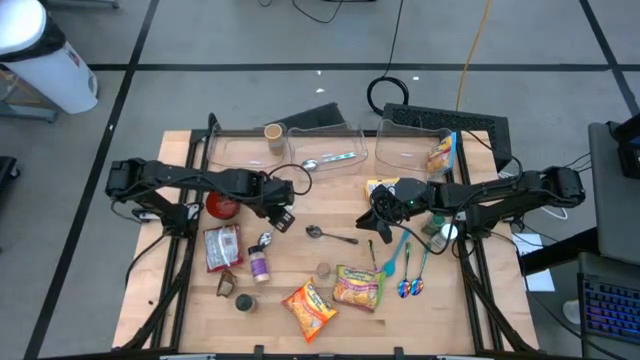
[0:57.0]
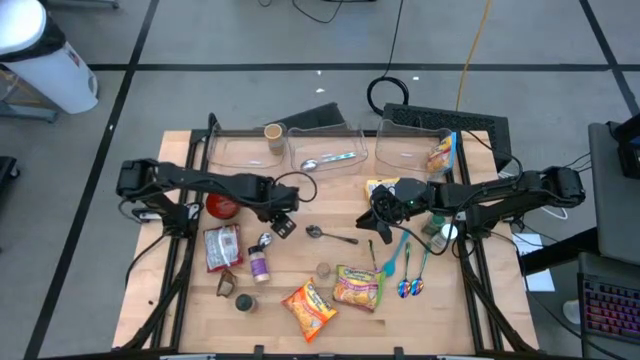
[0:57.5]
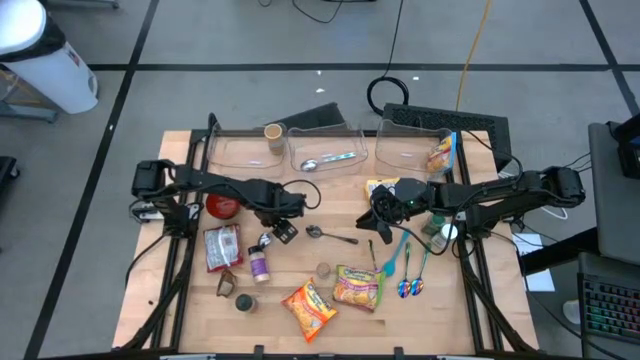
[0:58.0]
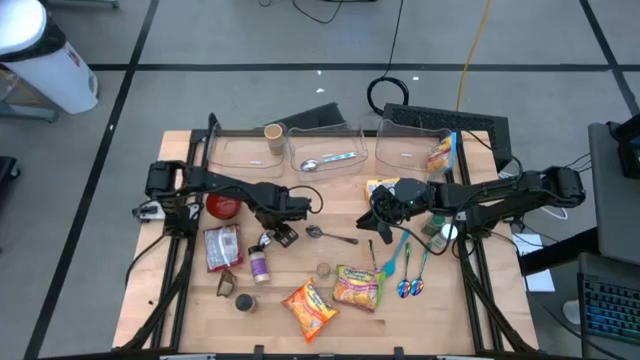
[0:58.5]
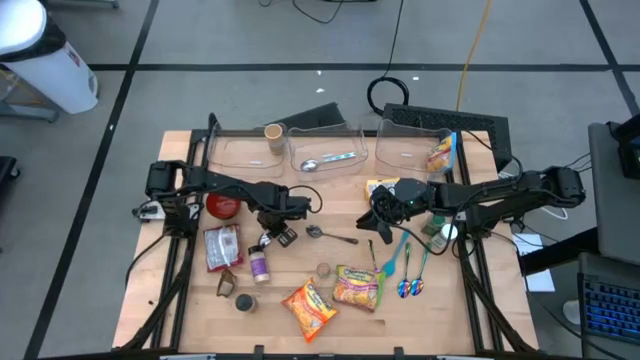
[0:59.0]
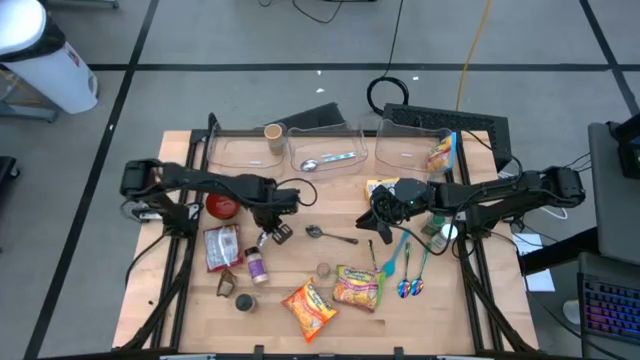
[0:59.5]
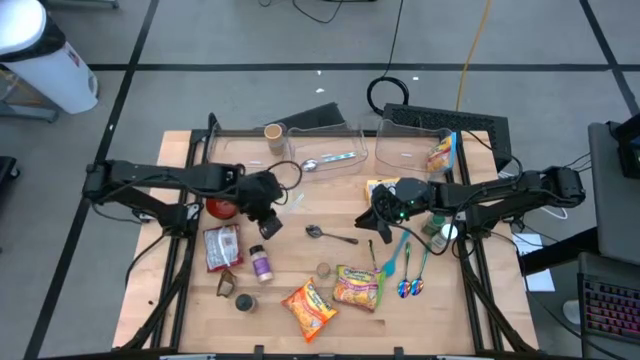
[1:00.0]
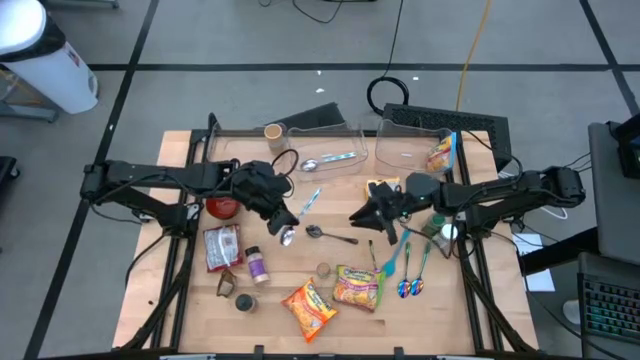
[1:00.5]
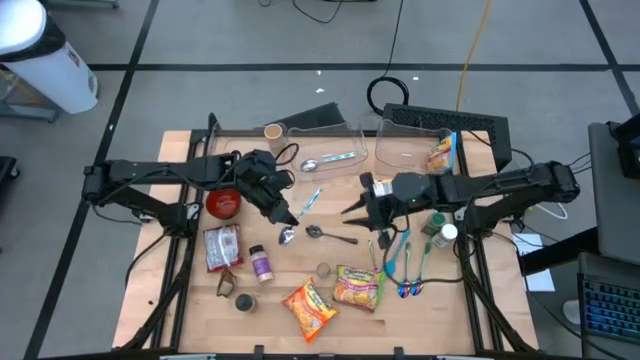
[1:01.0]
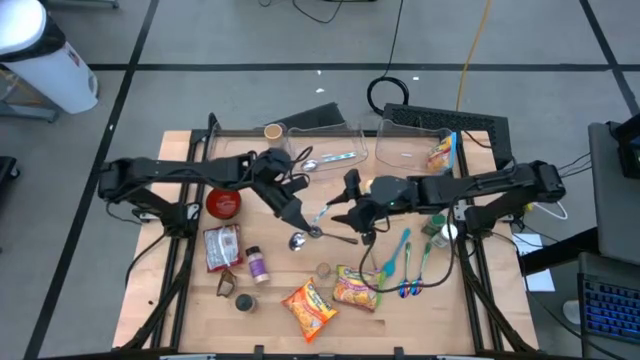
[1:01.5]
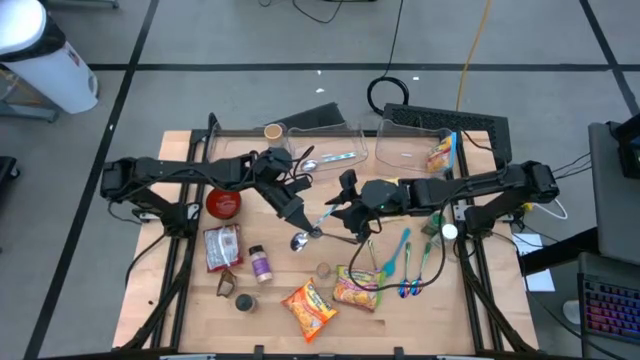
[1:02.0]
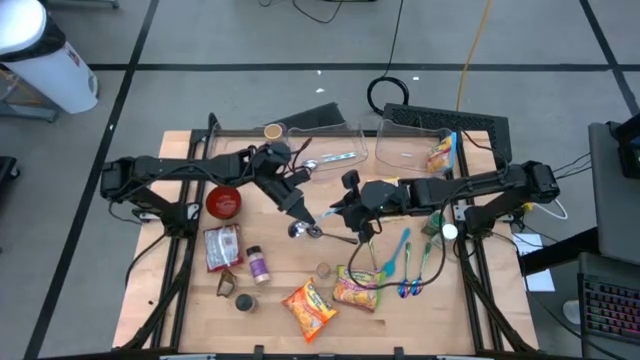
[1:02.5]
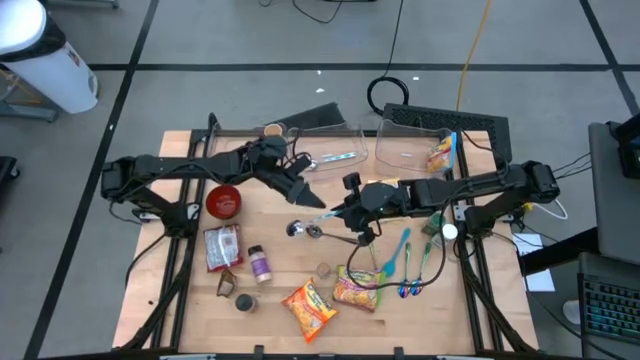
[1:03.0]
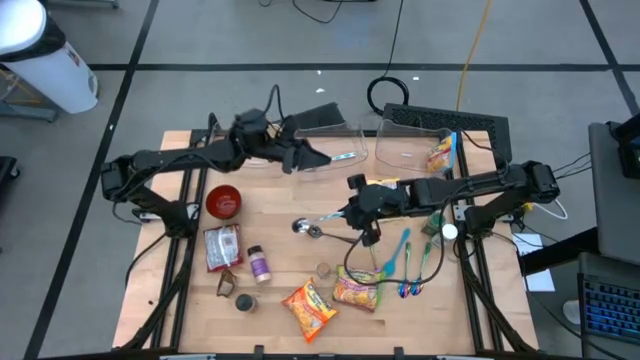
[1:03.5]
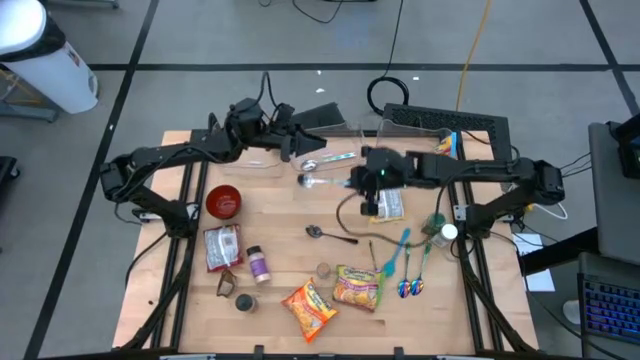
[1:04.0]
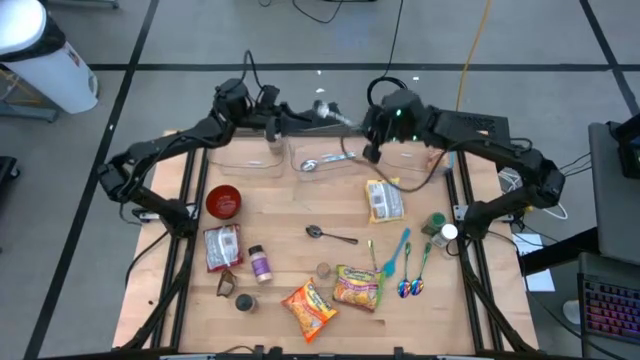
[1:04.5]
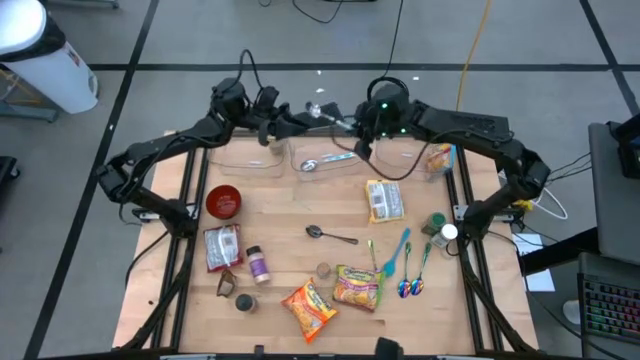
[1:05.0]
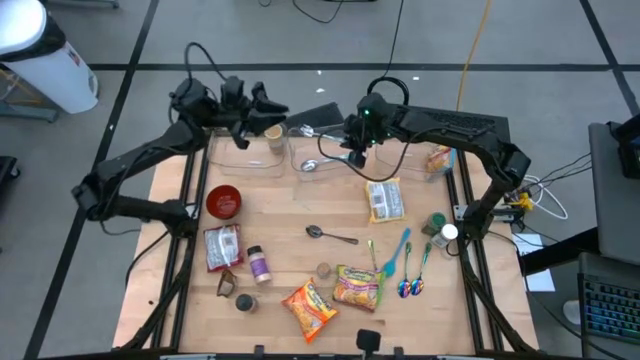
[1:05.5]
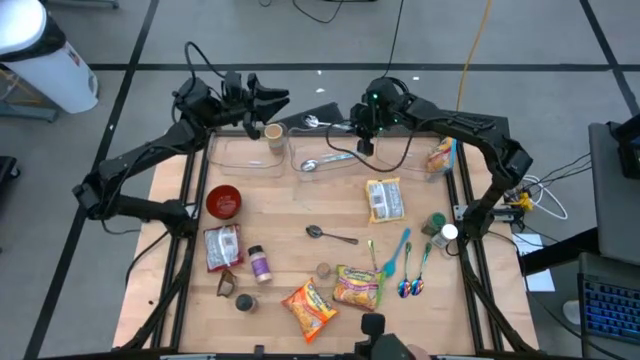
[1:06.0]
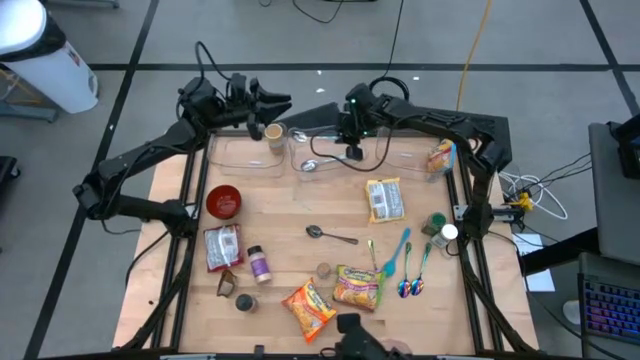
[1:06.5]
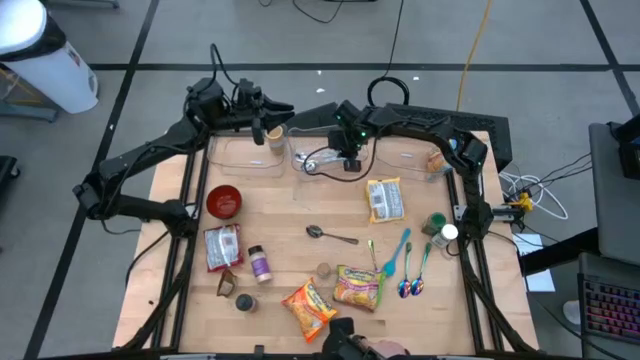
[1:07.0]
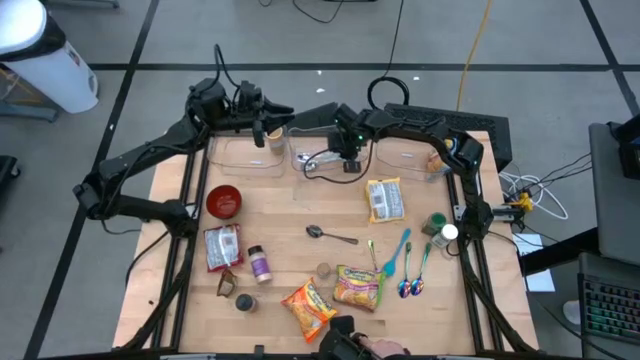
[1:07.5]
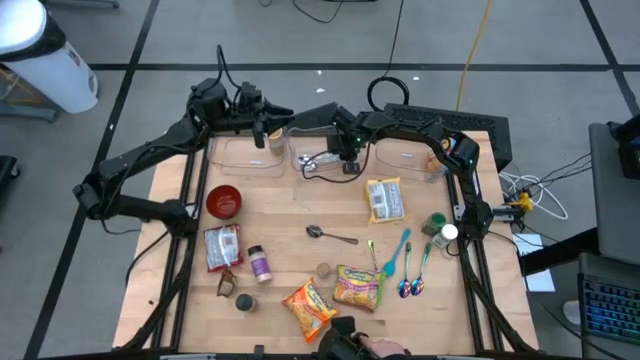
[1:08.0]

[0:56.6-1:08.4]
Task: Pick & Place Food Item
Put the blue patterned spoon into the middle transparent bin

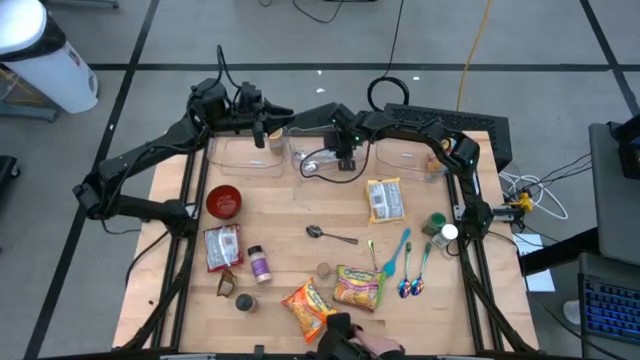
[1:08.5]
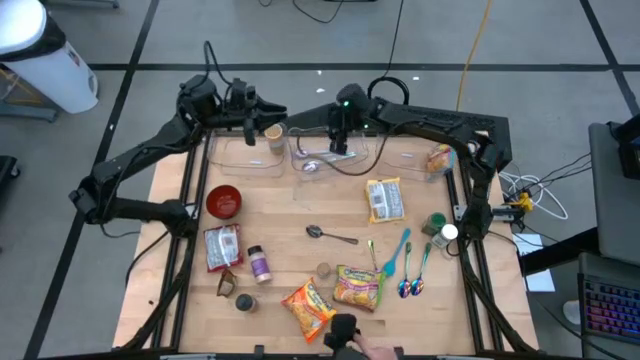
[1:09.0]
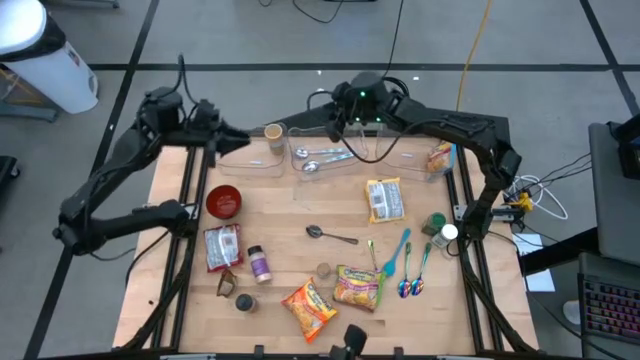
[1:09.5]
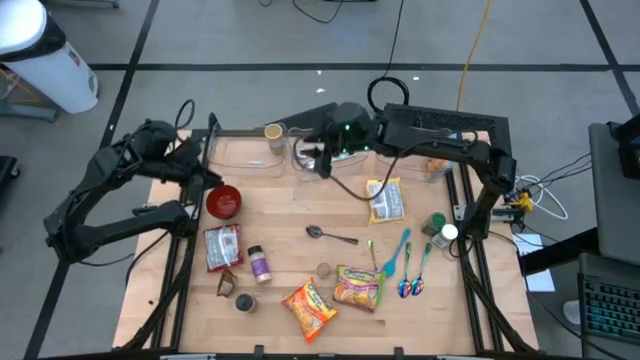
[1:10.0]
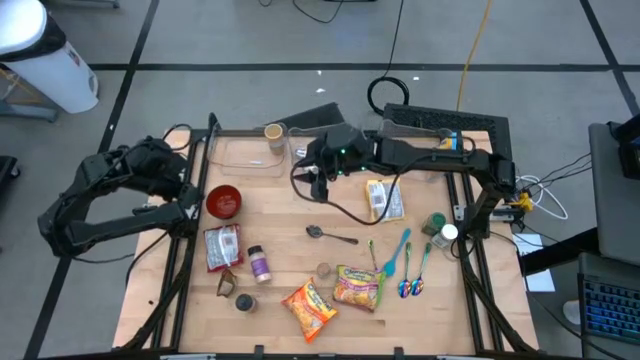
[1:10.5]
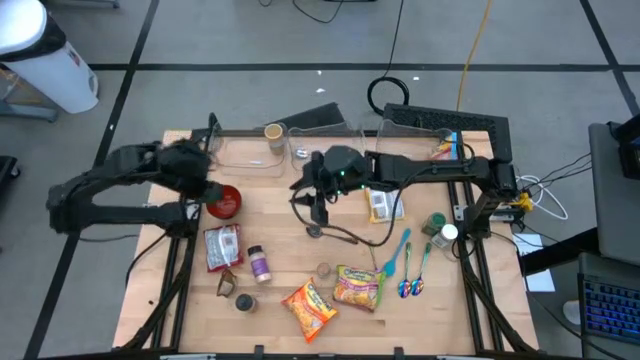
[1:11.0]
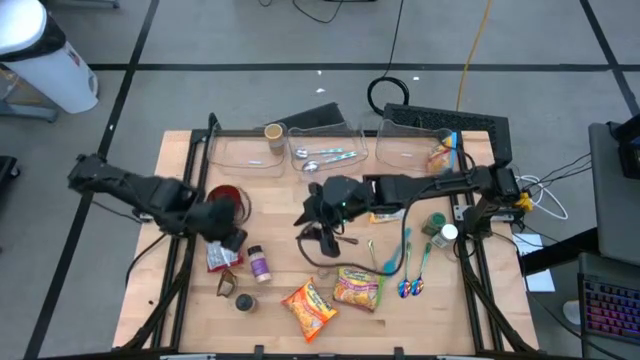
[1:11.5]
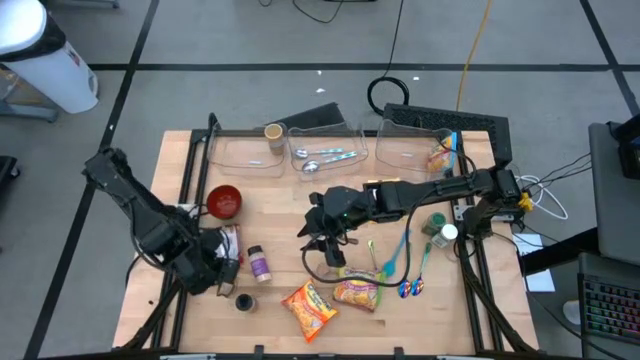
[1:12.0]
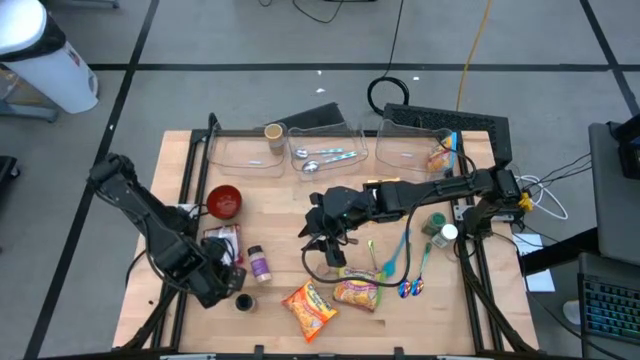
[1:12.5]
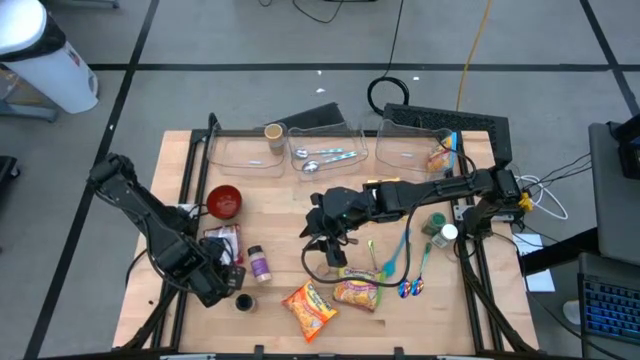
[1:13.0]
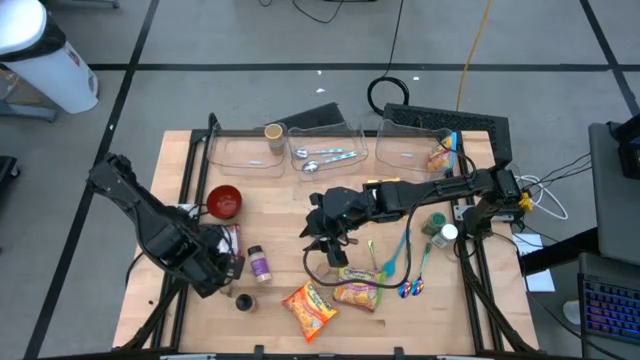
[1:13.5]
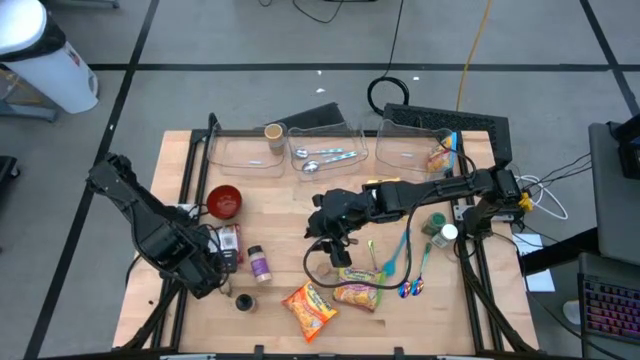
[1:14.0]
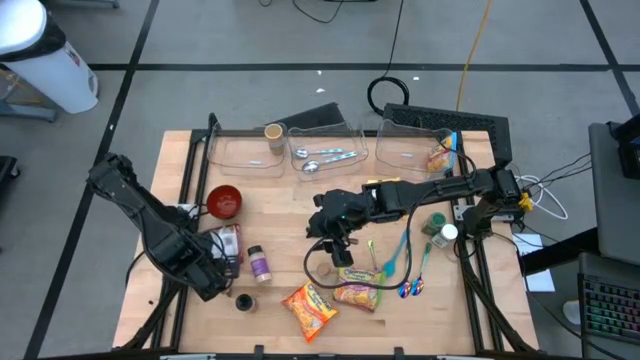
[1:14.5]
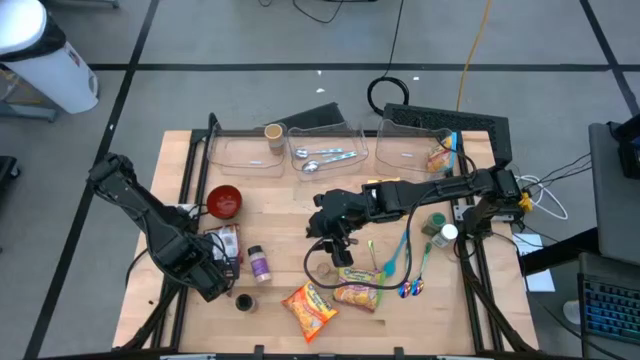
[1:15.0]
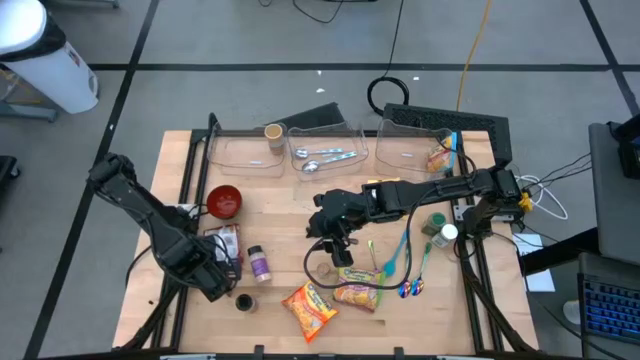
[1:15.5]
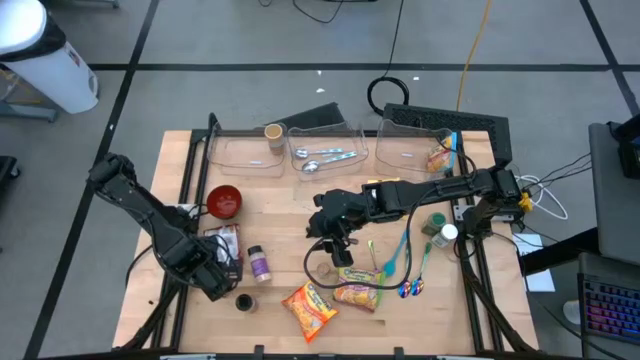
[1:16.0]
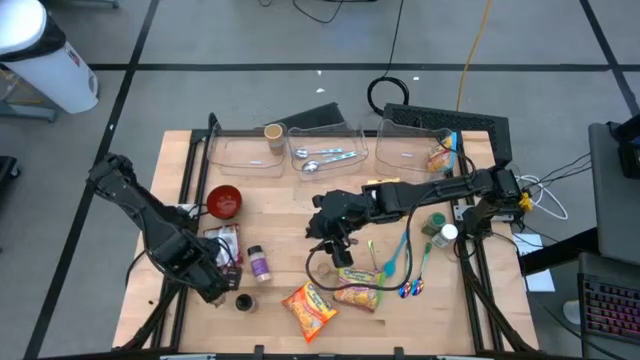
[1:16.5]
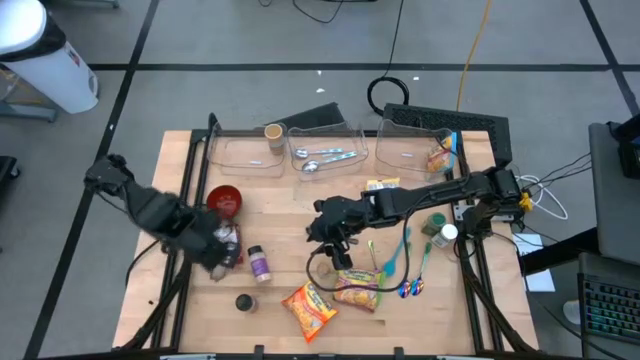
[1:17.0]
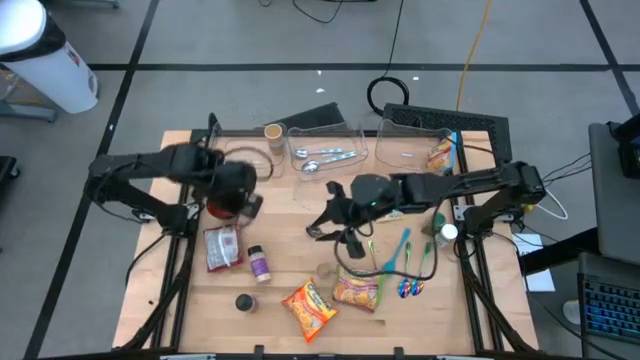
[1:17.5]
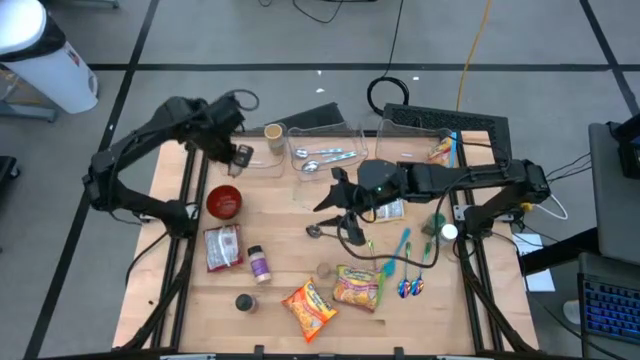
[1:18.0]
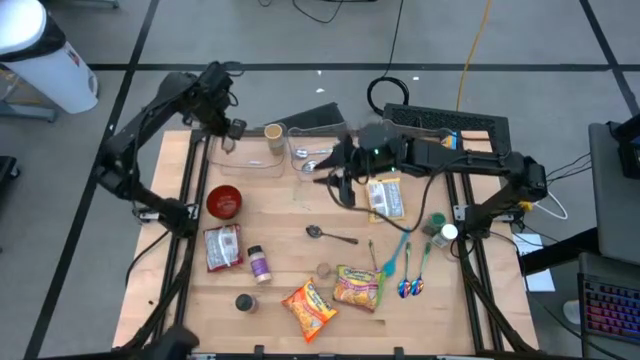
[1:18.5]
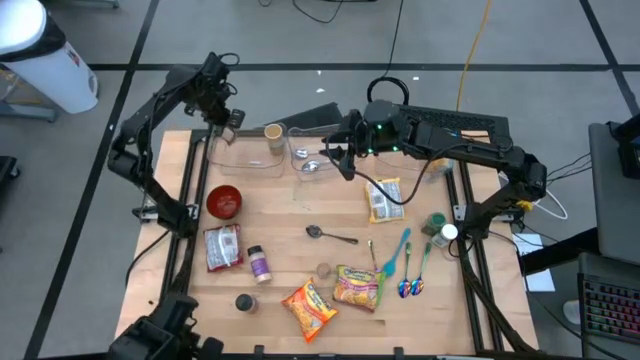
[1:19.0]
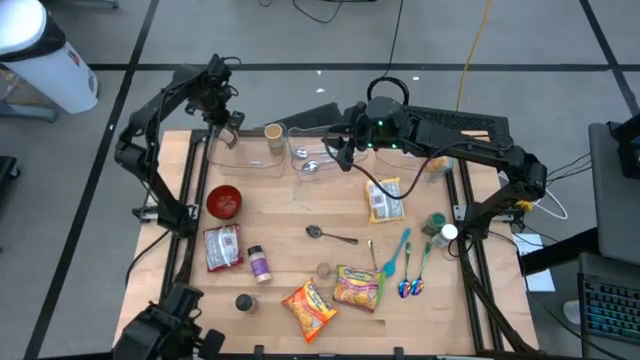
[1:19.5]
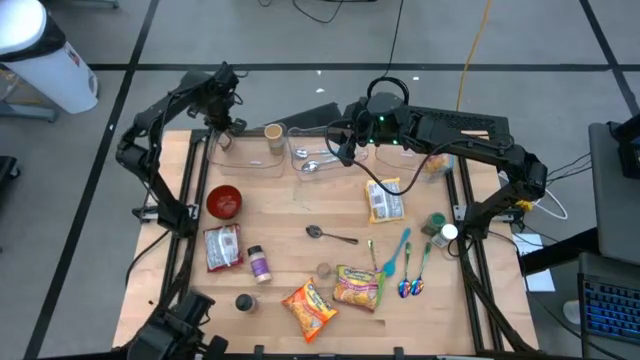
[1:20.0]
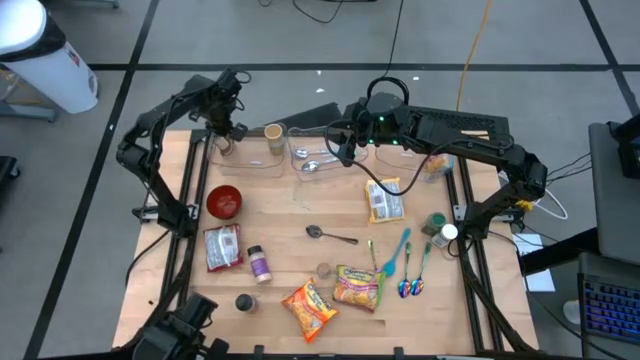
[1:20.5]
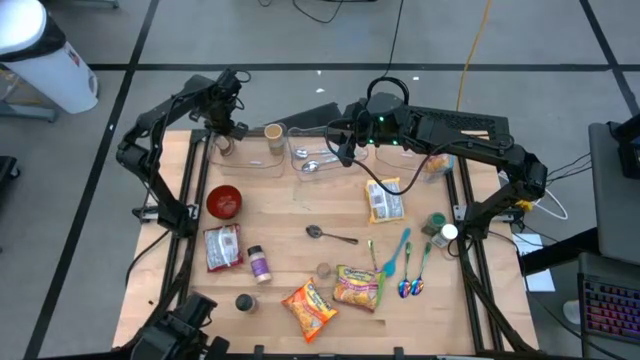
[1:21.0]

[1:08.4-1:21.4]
Put the orange seasoning pack into the left transparent bin
